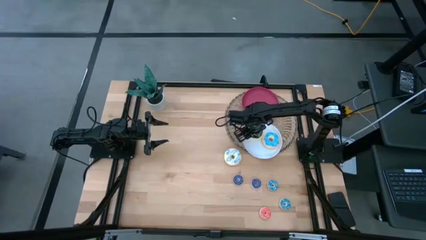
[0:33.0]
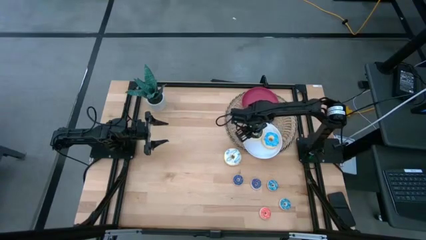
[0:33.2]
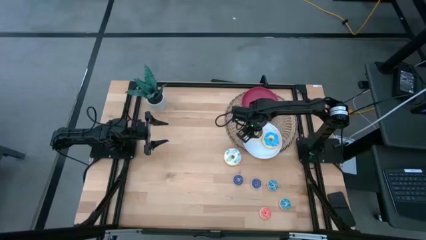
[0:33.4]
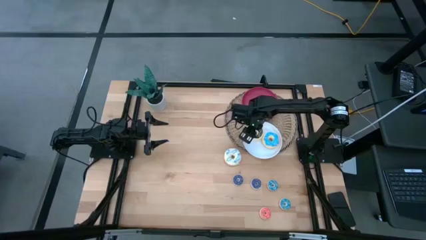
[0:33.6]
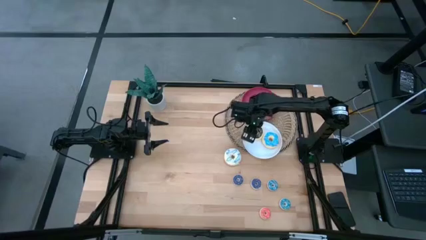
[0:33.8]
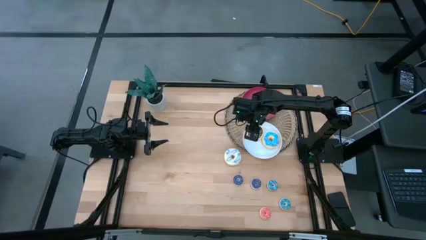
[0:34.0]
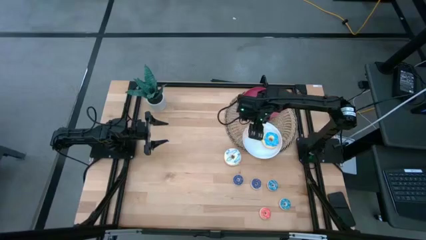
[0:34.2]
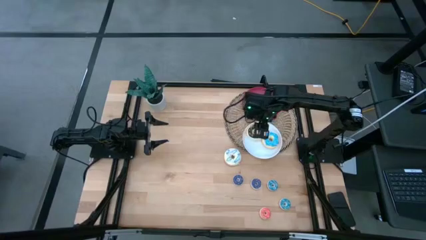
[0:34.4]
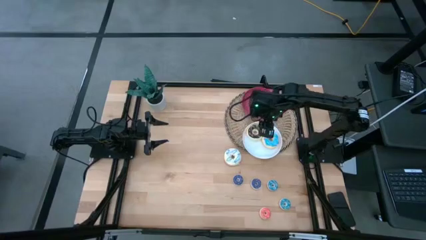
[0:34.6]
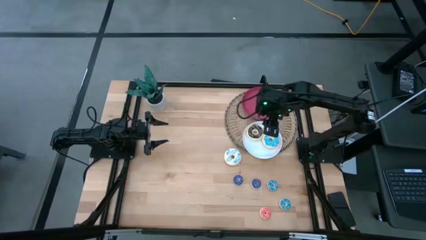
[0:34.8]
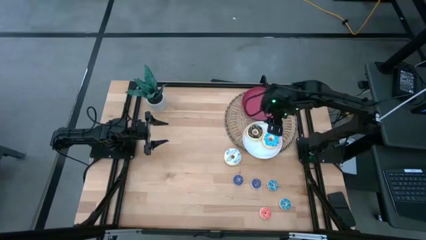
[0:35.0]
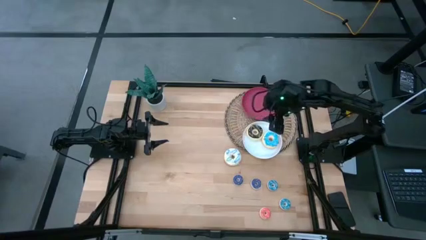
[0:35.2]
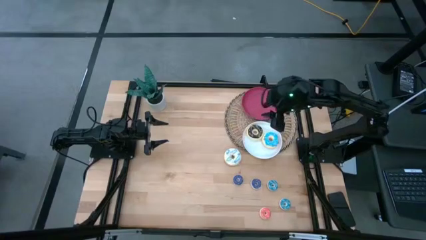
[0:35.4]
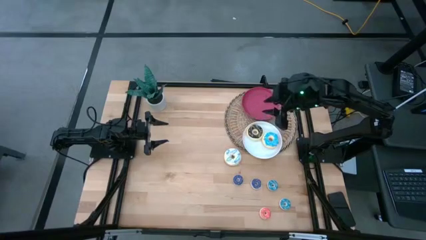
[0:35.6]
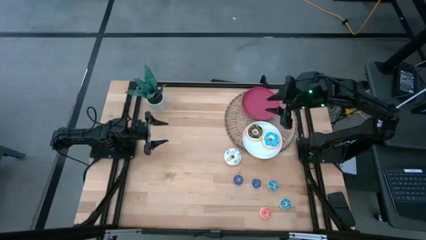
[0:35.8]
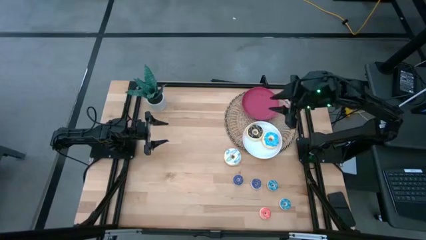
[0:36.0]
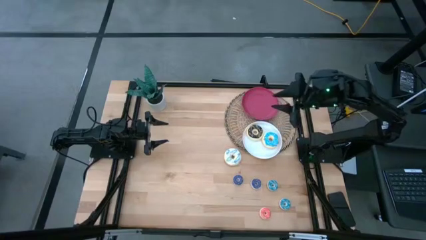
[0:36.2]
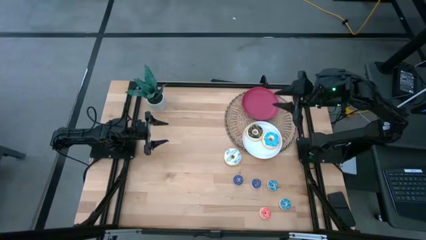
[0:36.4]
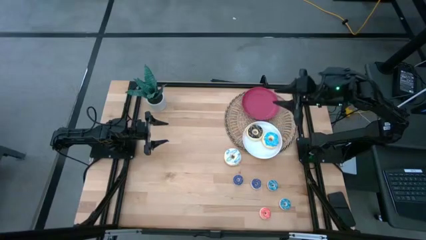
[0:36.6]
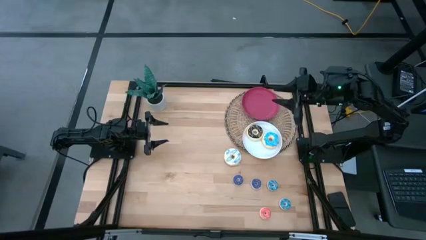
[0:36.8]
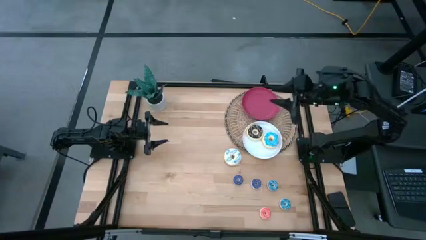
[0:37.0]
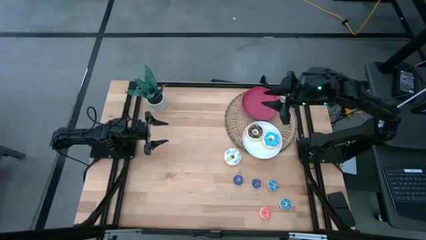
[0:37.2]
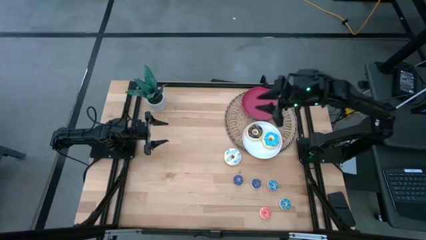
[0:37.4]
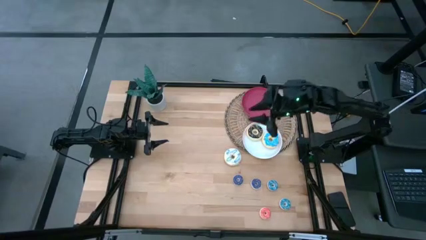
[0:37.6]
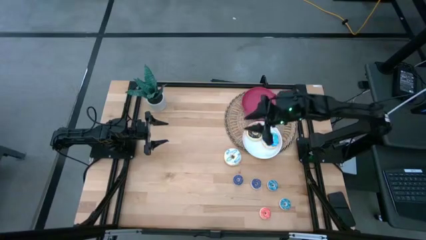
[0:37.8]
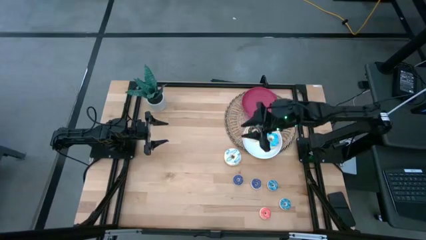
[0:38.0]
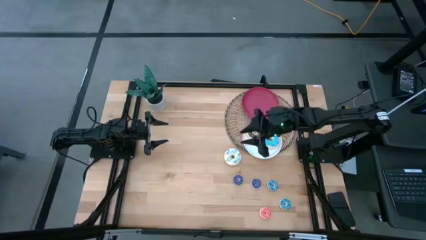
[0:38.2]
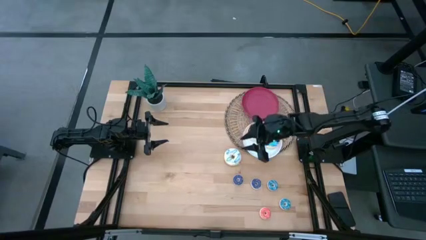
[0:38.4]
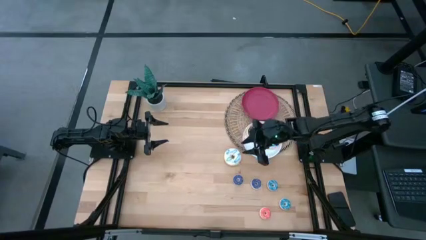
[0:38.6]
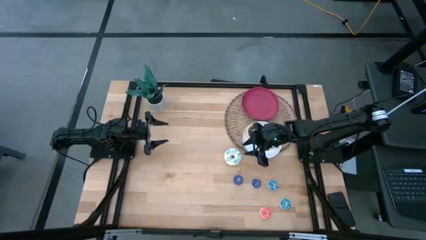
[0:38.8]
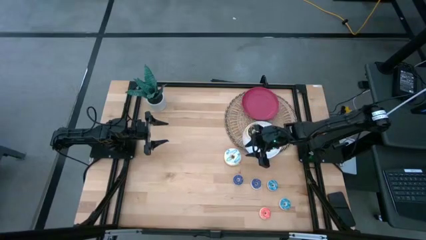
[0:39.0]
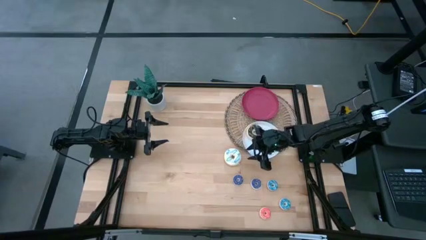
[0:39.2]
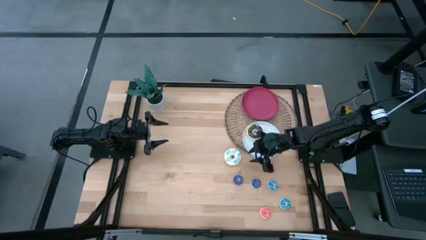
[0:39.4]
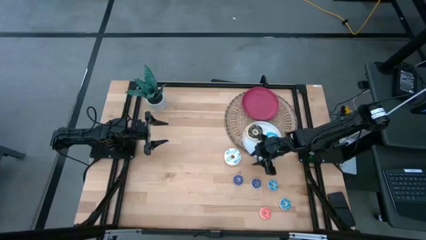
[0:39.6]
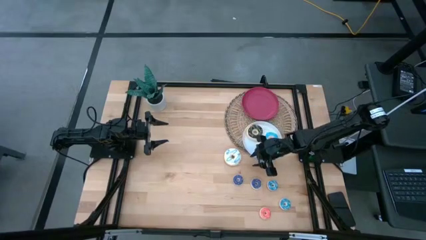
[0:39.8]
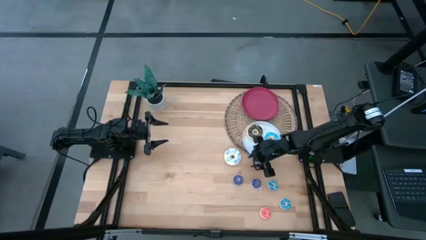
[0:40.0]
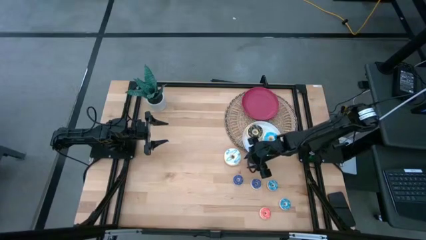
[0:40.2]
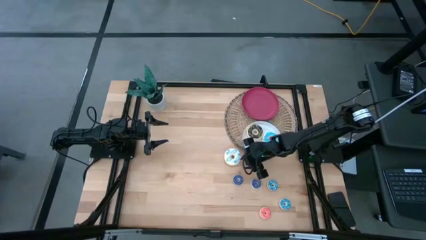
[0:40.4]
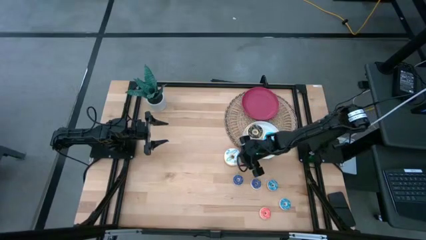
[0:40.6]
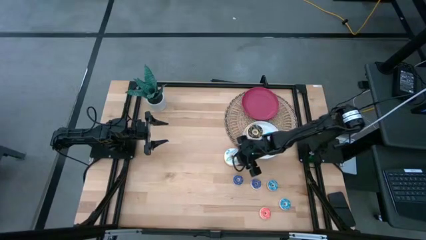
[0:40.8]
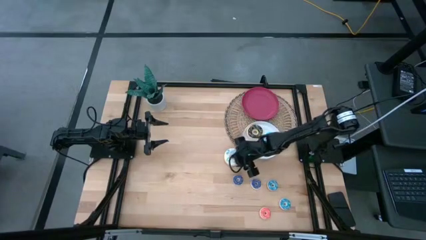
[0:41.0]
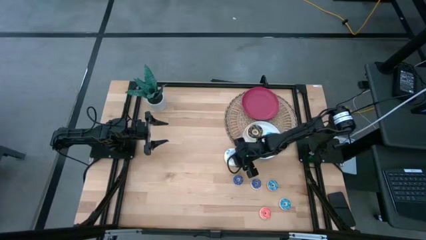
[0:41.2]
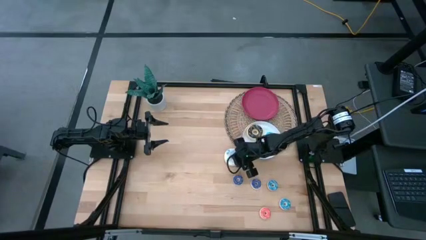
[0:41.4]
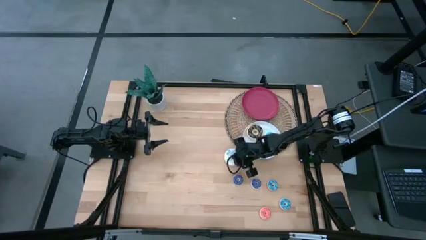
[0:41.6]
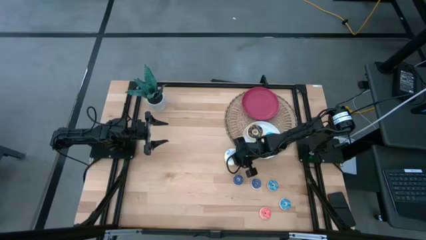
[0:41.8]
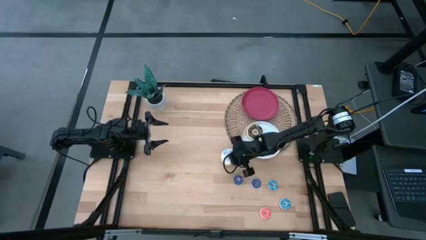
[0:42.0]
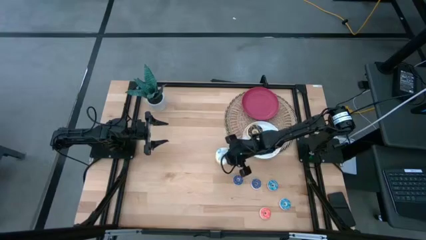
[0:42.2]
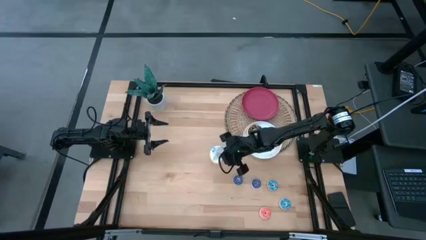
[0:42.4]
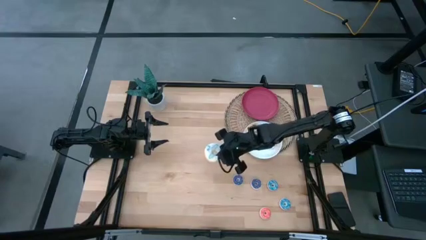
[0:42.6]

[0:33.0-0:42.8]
Task: Pick & Place donuts
Put the big white donut on the white plate
